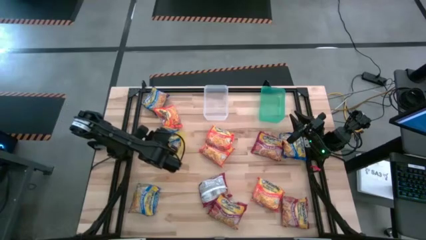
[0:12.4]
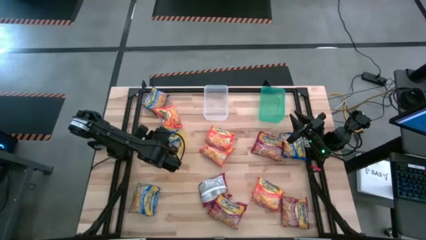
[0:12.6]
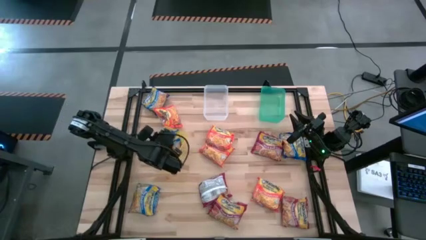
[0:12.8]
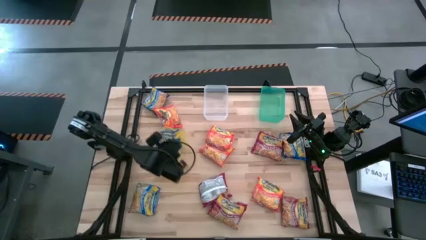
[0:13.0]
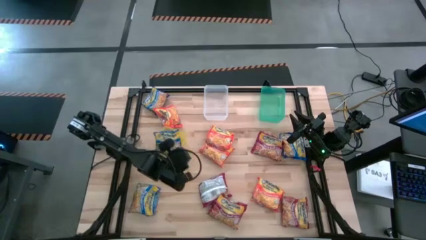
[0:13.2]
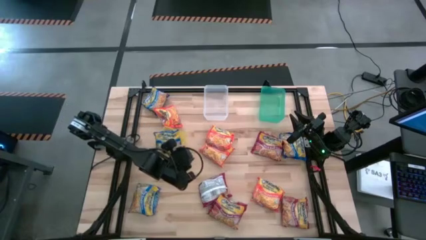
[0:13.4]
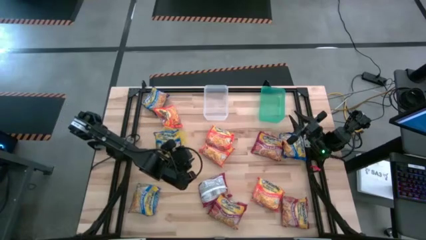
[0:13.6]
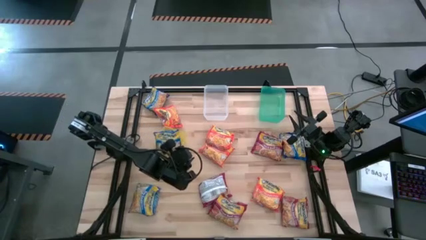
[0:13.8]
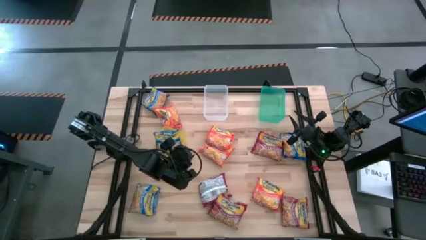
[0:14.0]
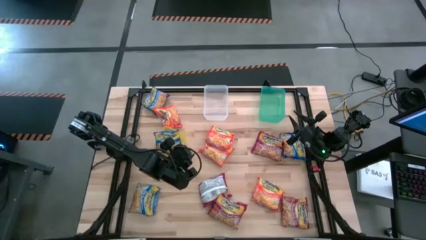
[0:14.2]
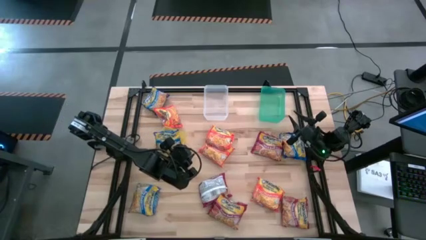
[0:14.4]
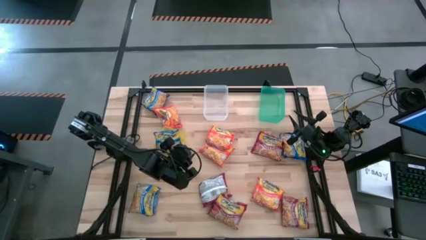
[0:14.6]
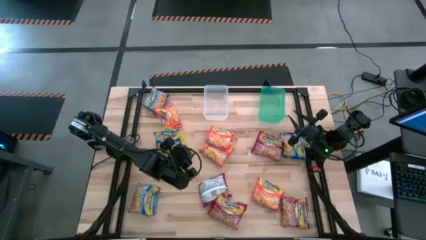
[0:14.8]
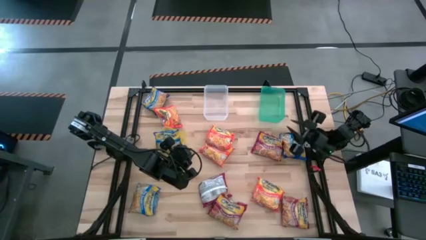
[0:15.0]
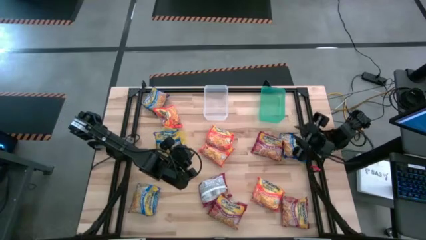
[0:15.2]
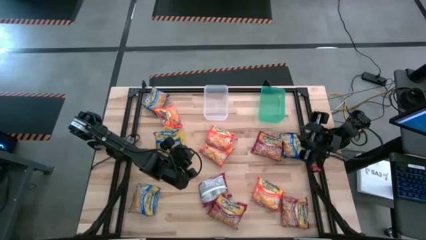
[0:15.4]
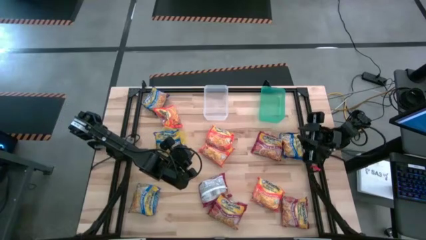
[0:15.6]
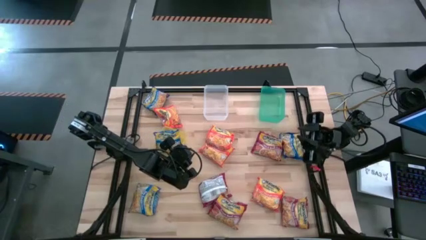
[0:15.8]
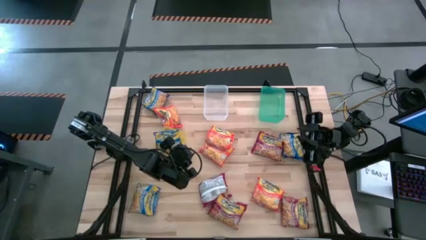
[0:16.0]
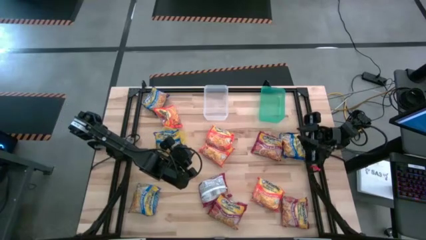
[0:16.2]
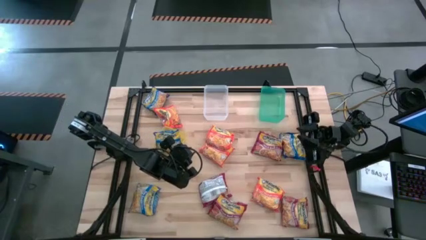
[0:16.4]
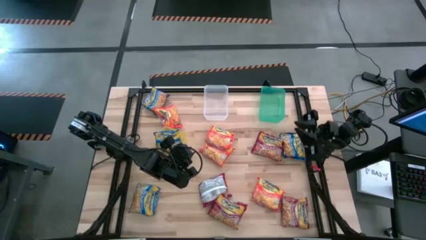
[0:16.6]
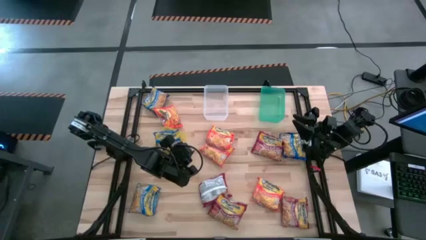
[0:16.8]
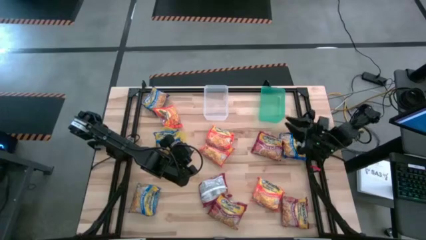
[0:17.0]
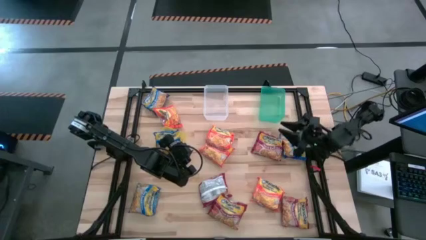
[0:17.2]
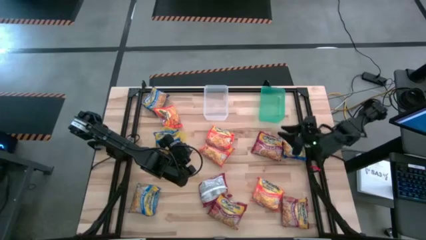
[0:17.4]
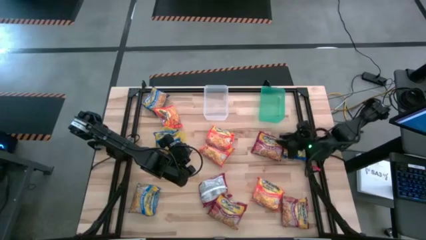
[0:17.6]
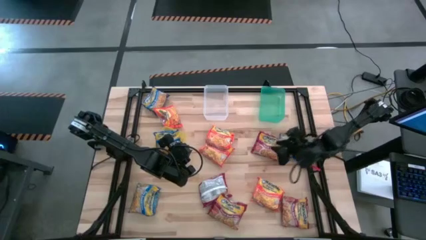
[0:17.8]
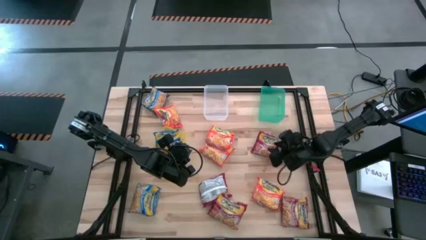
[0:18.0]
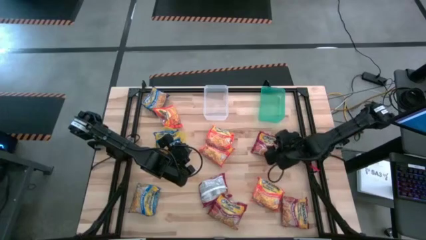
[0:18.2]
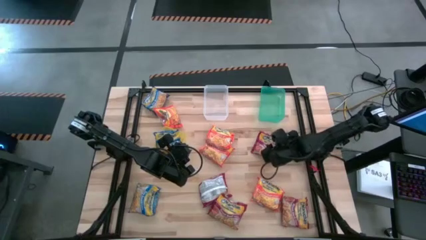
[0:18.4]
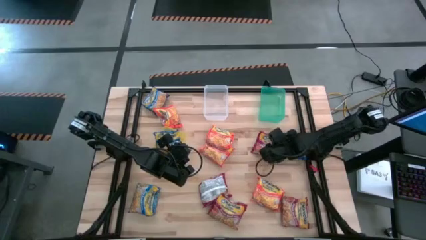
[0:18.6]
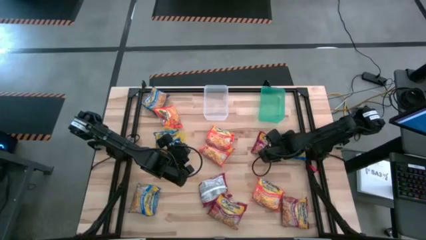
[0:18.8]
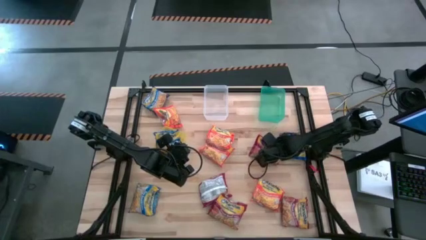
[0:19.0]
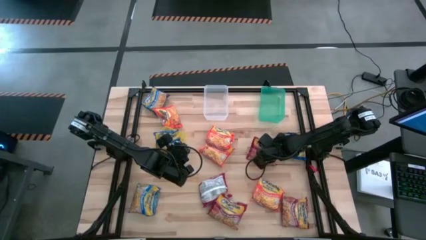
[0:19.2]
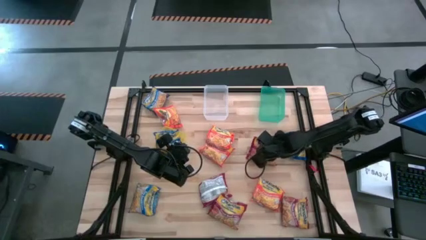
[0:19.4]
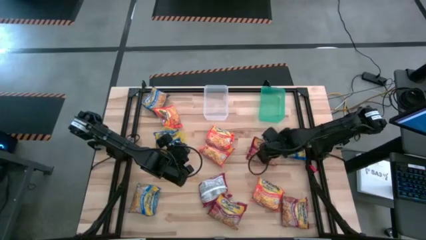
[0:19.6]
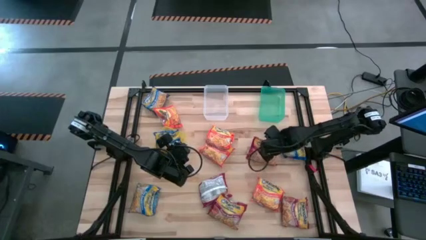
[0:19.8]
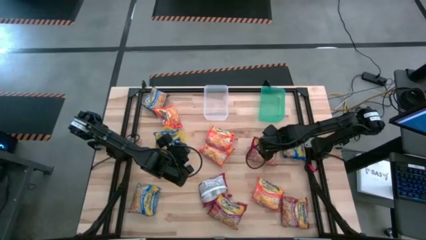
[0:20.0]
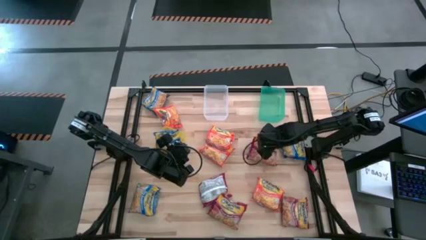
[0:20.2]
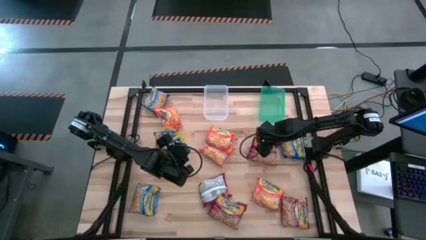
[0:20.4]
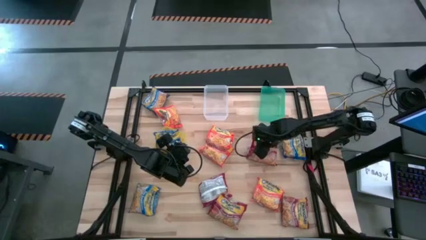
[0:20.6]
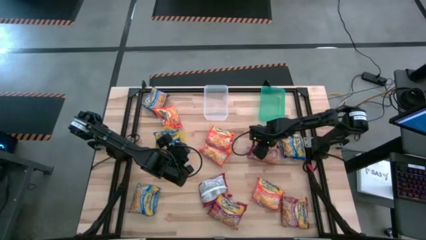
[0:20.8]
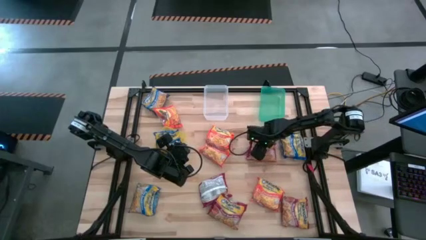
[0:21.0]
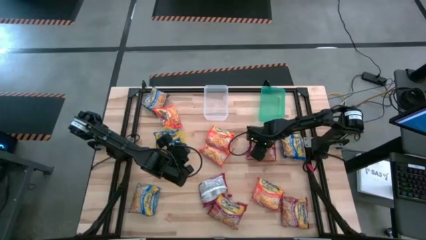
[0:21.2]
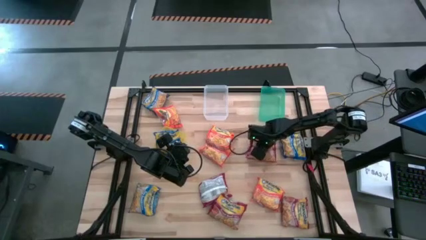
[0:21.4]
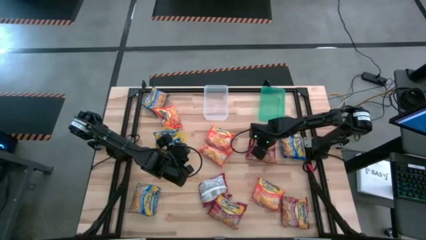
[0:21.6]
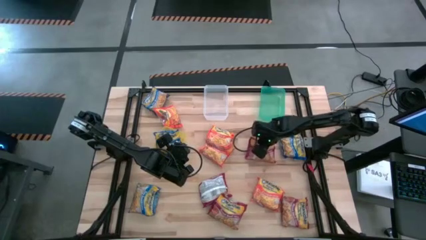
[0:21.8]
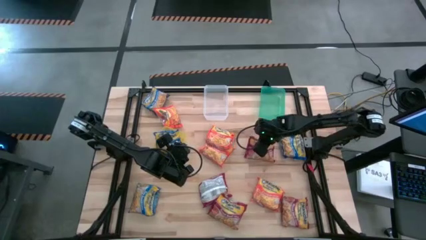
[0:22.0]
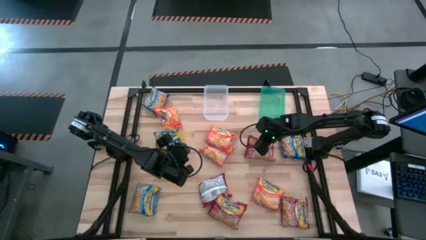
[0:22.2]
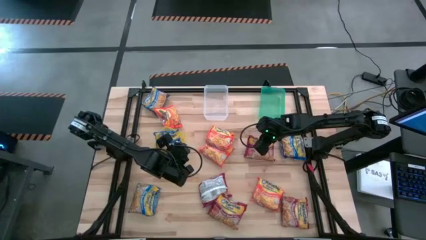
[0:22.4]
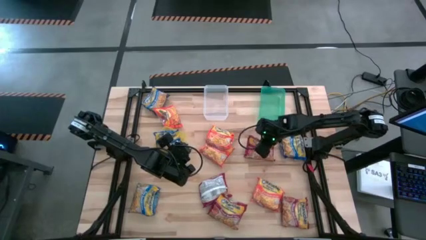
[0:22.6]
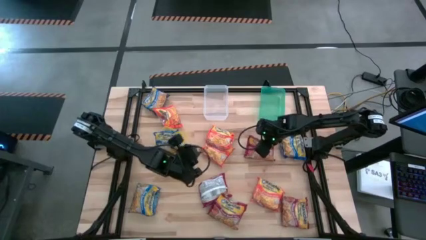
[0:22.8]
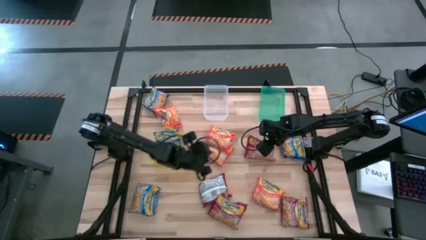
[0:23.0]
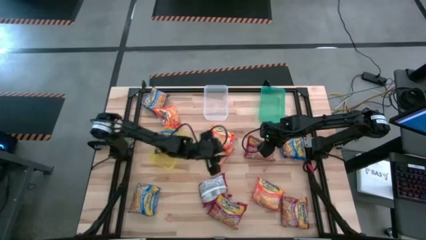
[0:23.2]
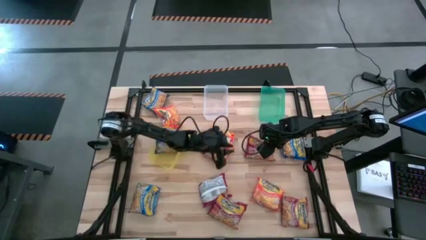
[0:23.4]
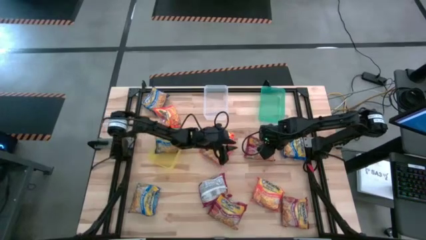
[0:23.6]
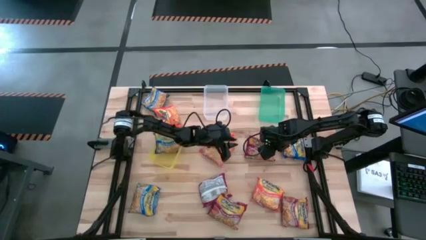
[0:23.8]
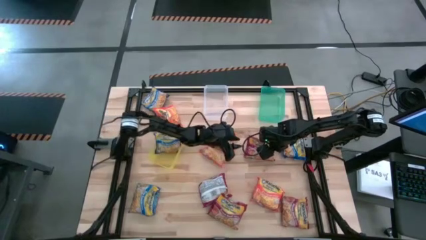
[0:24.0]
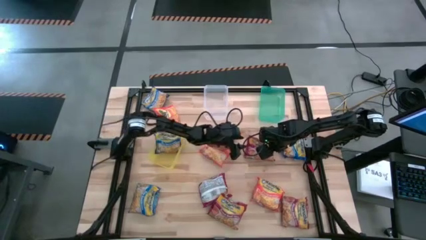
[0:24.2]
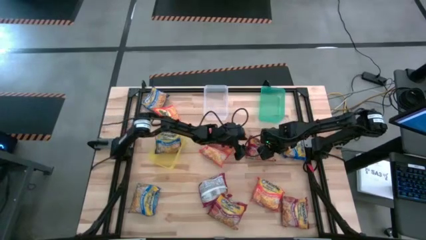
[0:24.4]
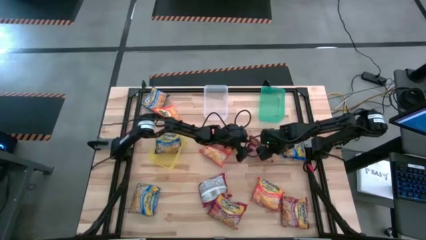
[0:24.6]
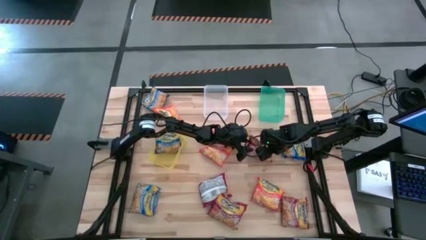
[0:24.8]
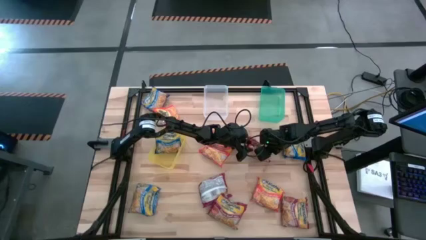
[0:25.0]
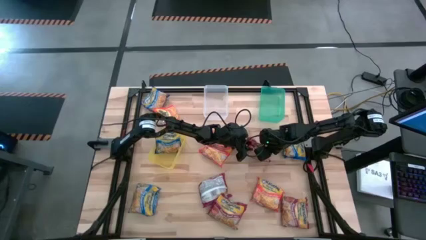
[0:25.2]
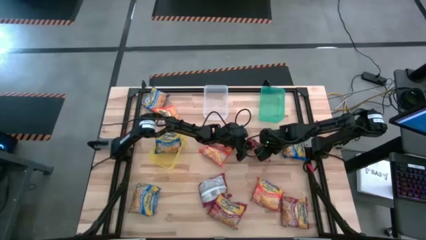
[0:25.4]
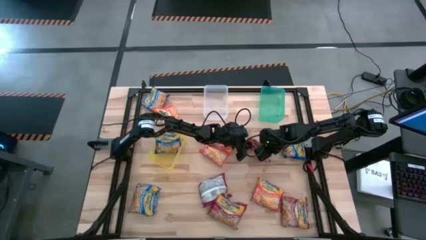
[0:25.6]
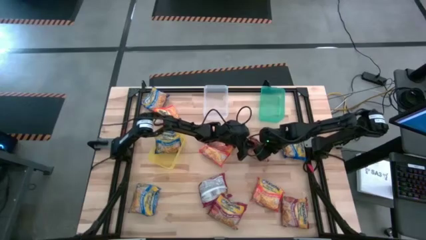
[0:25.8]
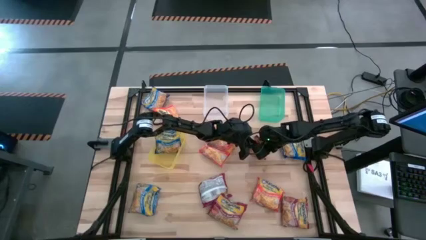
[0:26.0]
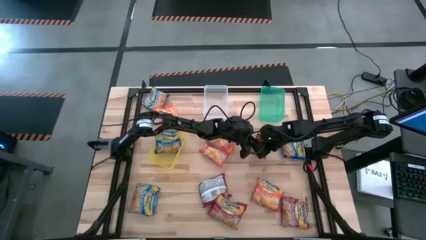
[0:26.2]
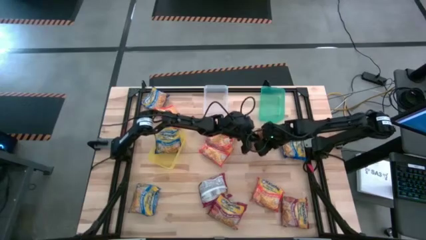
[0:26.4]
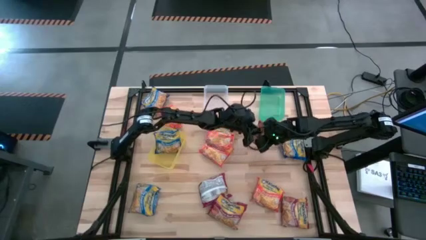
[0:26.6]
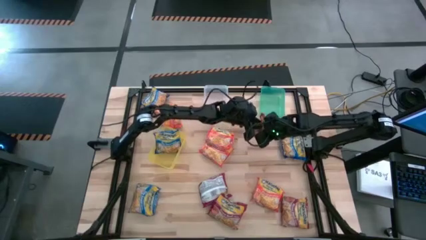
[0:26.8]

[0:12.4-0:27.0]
Task: Sort Maruchan noodles
Put the red noodle pack into the green bin

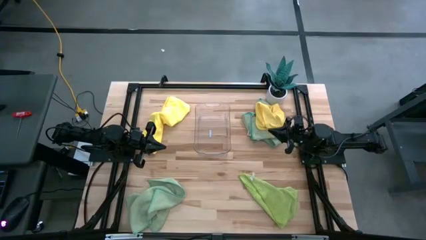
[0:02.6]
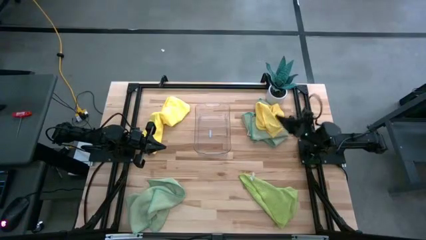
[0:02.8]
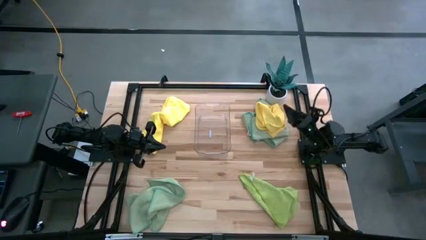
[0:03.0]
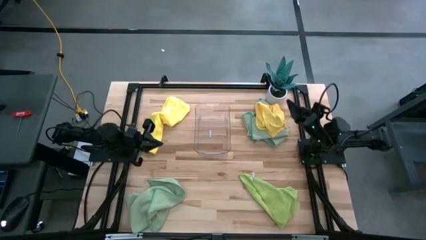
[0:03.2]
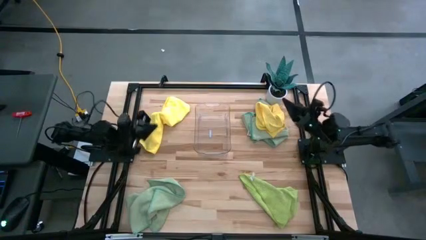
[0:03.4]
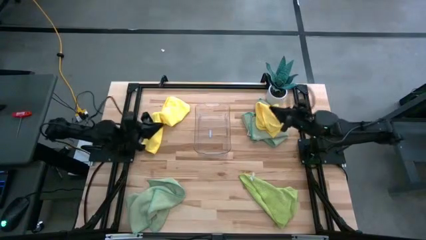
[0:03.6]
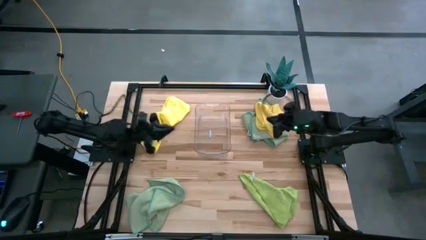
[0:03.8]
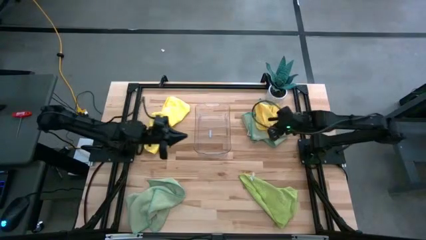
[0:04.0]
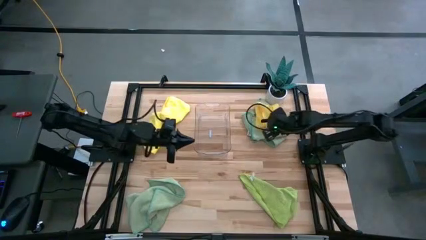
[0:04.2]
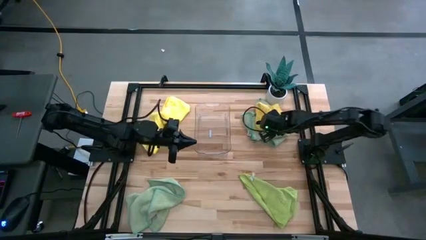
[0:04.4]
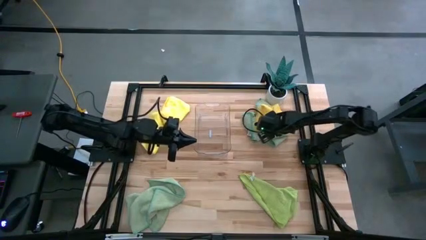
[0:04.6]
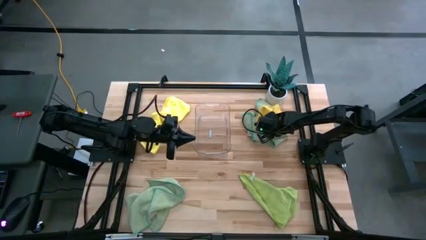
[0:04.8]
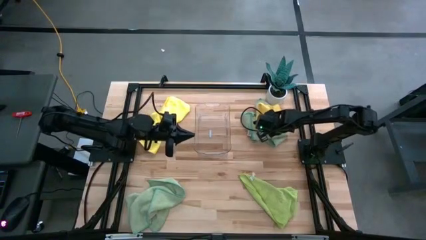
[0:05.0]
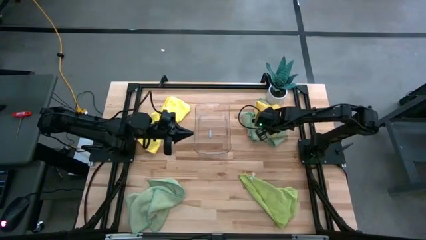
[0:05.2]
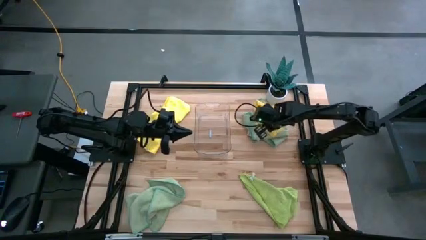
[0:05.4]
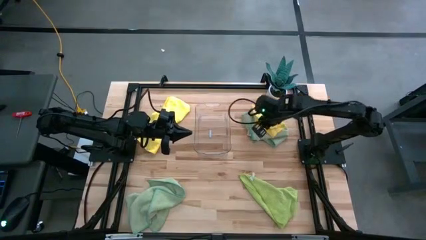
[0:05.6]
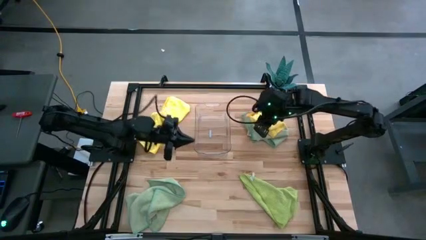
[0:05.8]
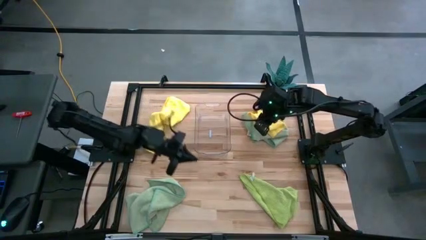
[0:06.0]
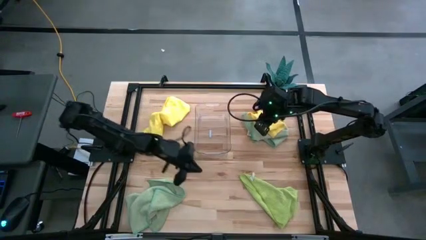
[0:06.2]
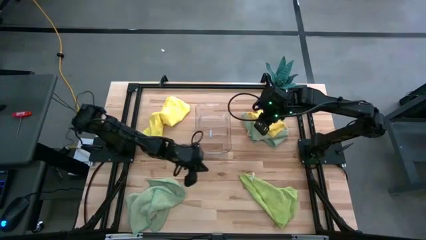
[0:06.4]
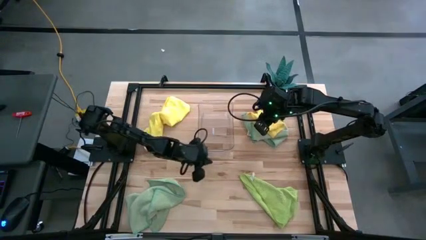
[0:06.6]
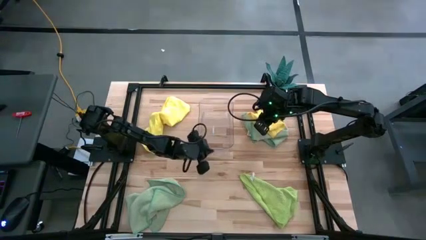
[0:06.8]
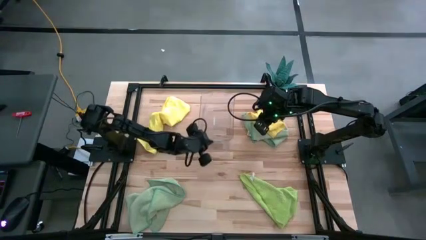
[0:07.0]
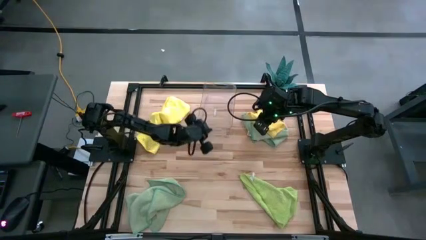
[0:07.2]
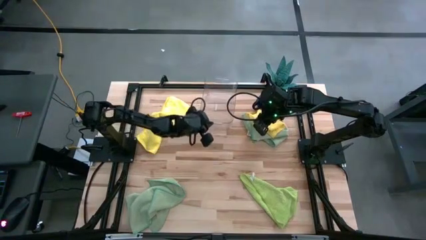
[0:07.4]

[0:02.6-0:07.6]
Task: Fold microfiber towels
Move the transparent bin to the top center of the table
